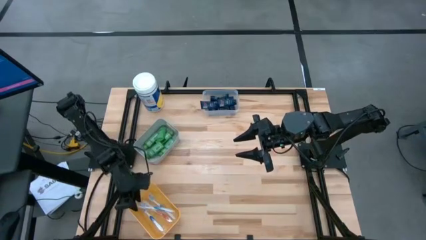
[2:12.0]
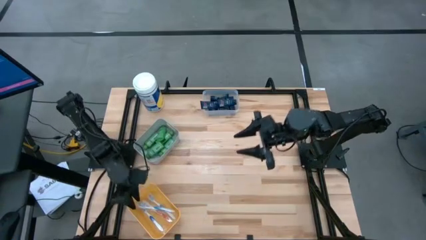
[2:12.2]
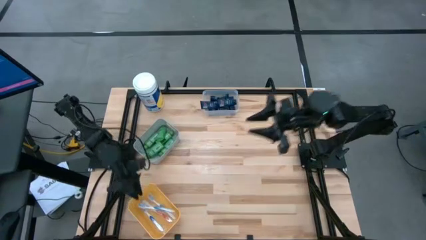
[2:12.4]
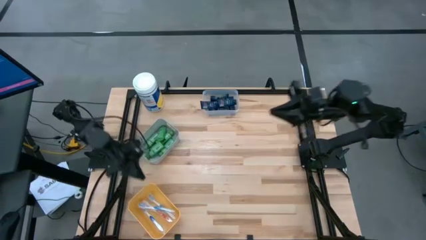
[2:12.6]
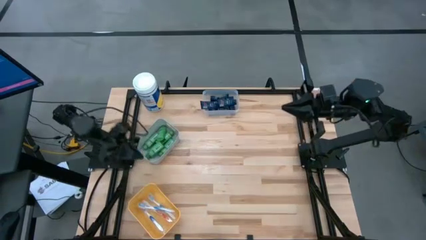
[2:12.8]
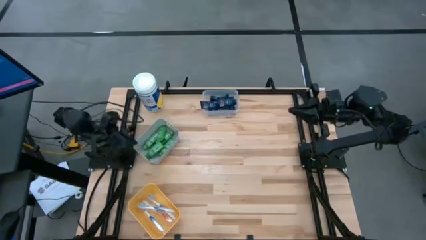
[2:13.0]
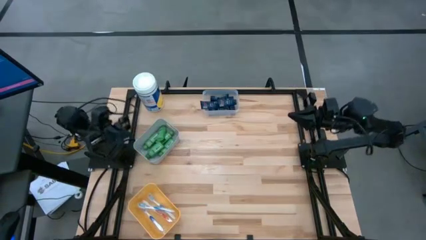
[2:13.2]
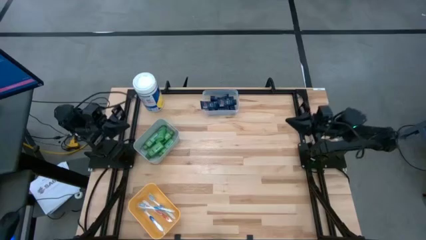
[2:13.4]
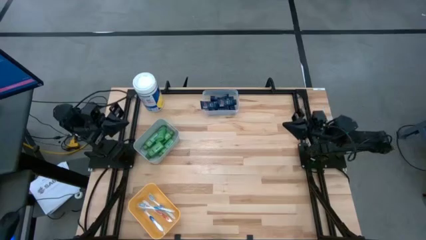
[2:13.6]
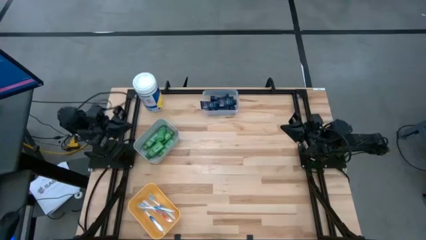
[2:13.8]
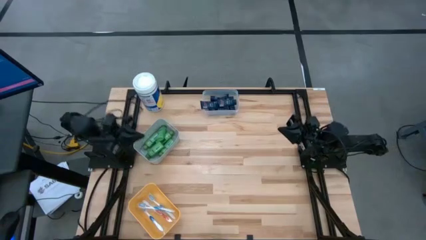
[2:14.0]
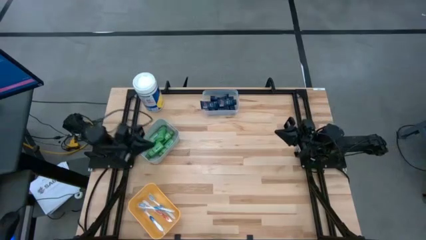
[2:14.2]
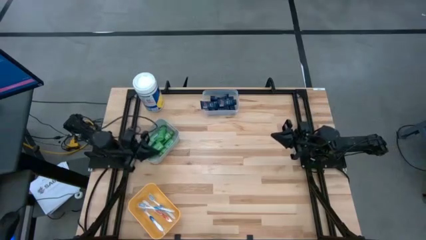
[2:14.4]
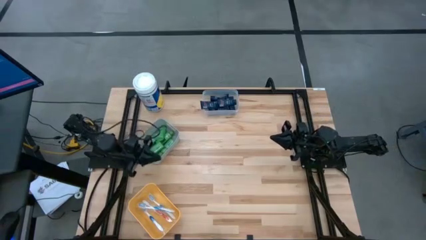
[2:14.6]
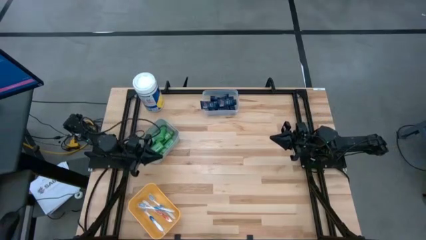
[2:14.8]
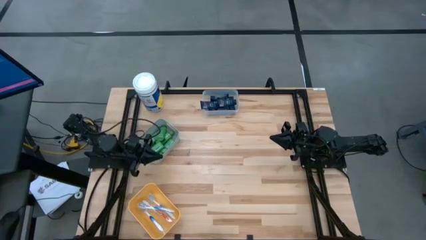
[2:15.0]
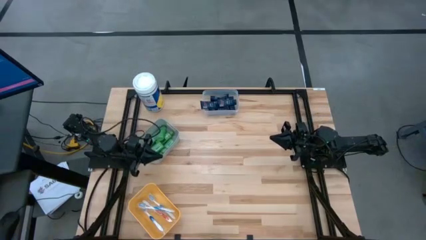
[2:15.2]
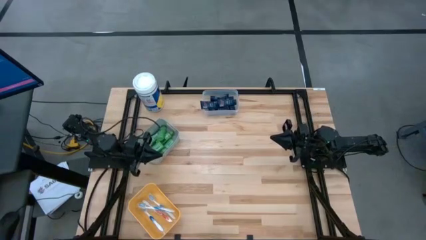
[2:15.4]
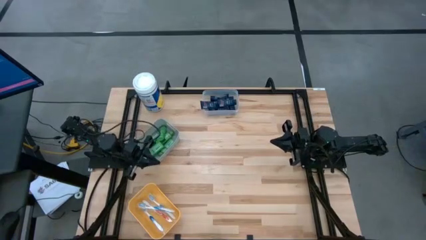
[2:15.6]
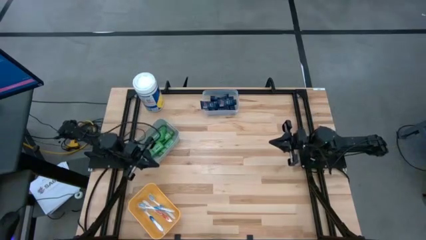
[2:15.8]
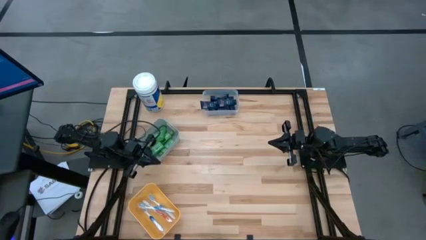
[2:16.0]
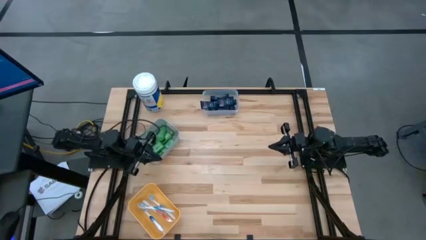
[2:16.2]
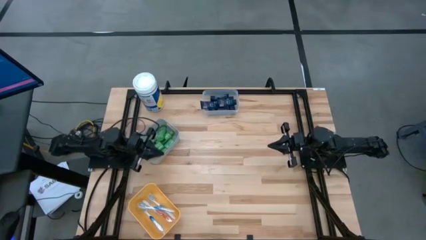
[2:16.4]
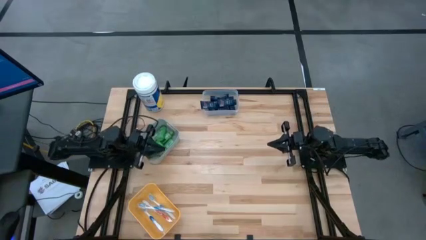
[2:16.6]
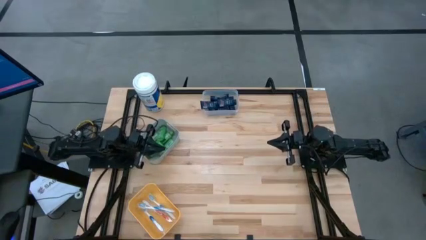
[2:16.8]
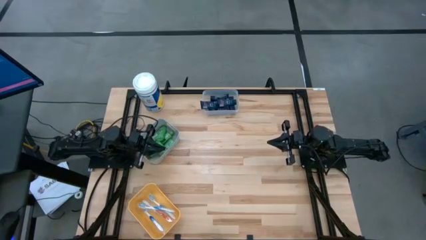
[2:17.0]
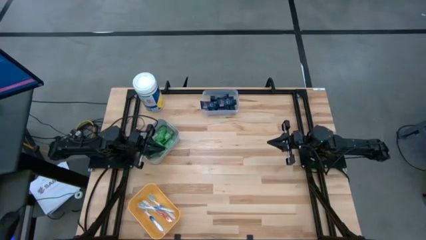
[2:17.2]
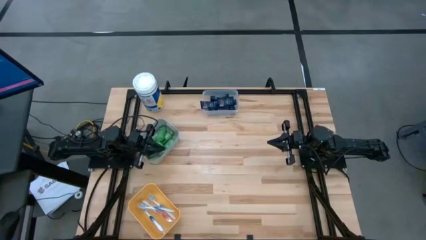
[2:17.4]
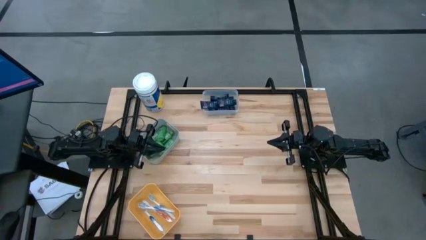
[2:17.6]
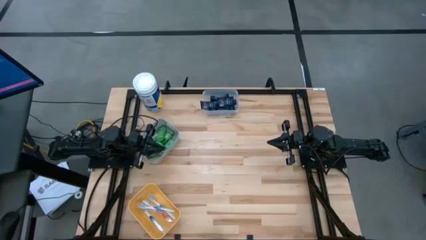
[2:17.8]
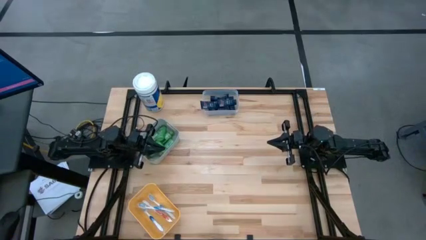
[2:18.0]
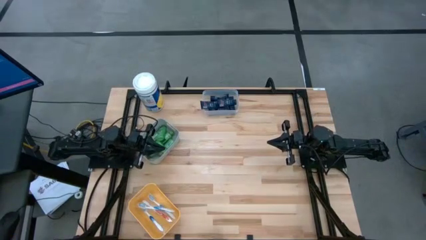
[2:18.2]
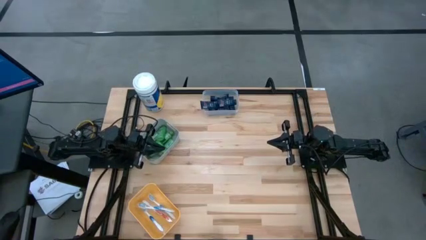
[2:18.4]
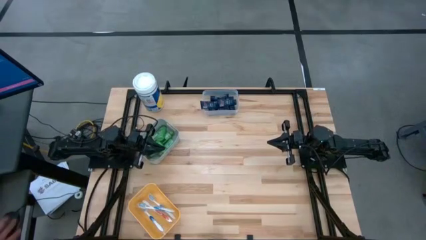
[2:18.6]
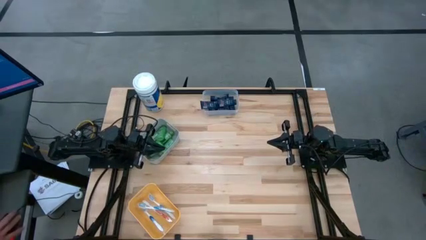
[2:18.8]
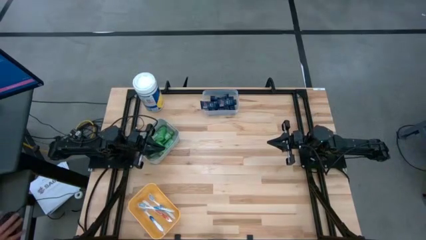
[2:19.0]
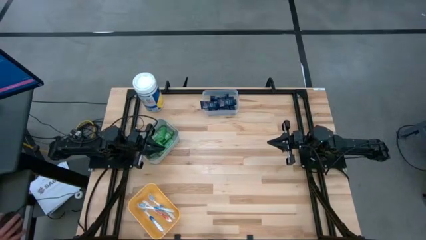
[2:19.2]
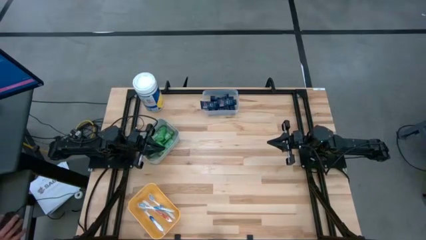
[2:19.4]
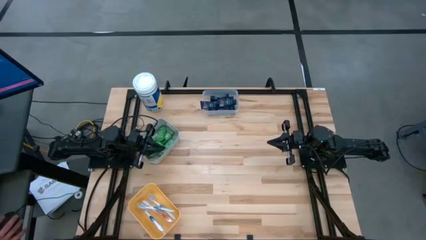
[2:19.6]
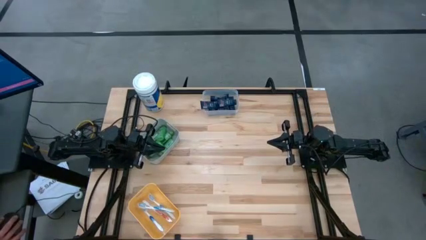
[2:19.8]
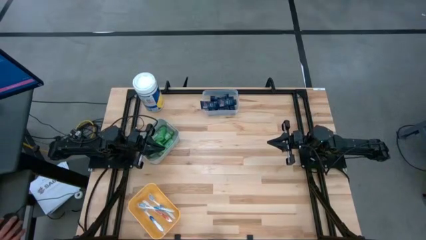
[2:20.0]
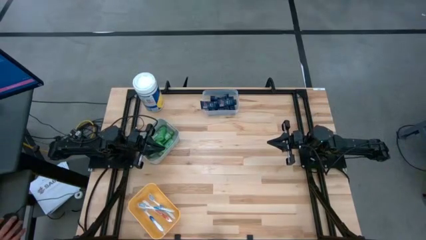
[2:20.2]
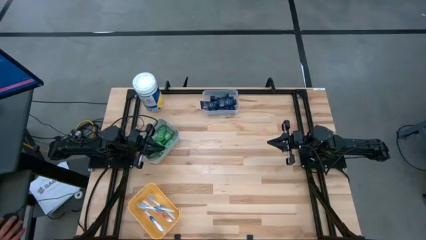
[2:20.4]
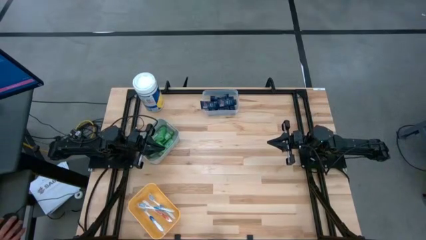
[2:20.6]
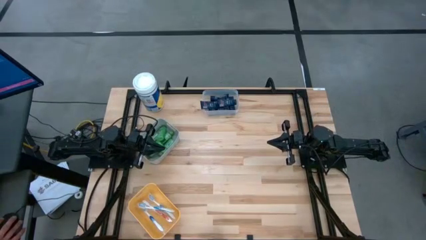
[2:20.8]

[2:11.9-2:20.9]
Task: Pick & Place Travel size toiletries
Return to Home Position
